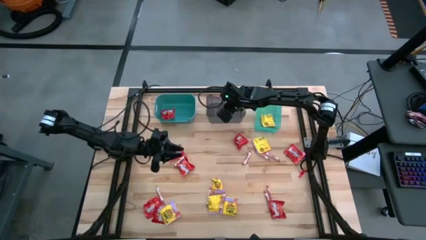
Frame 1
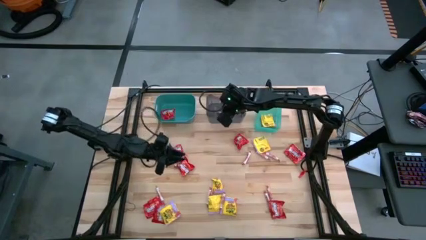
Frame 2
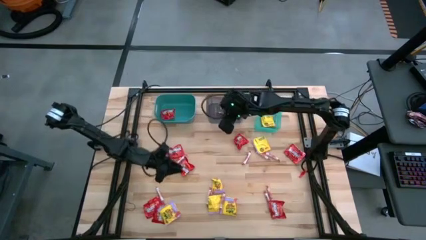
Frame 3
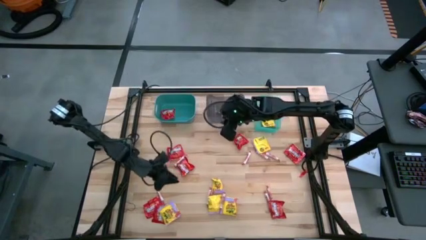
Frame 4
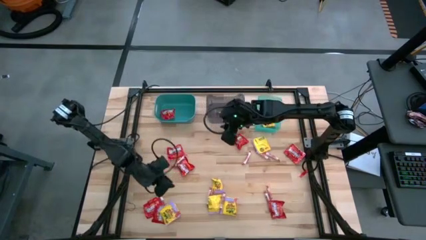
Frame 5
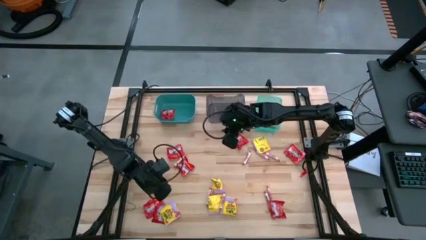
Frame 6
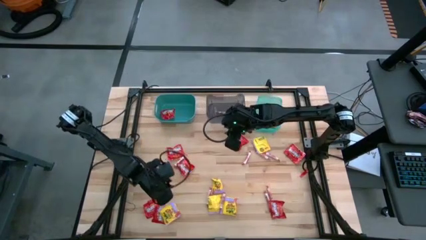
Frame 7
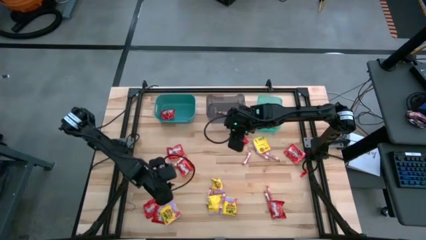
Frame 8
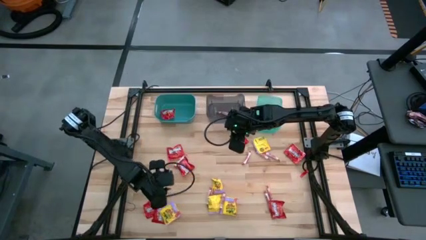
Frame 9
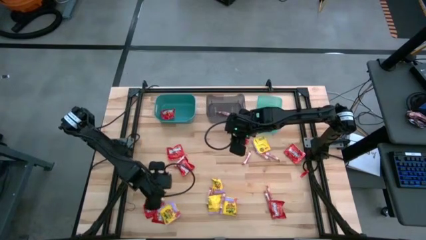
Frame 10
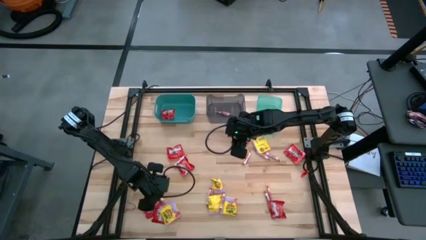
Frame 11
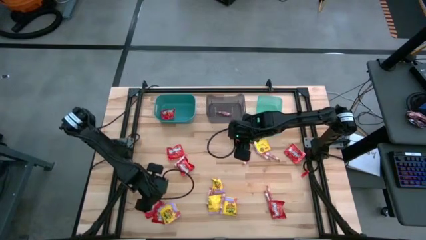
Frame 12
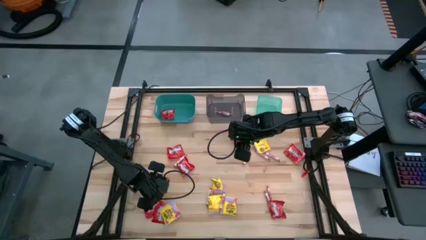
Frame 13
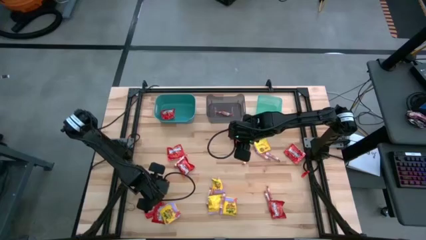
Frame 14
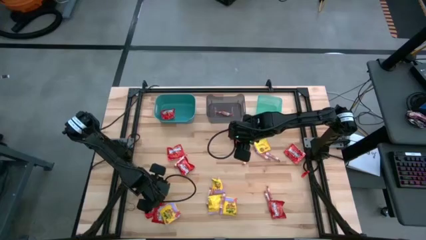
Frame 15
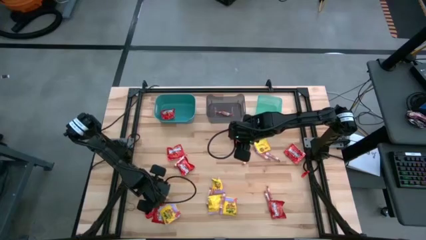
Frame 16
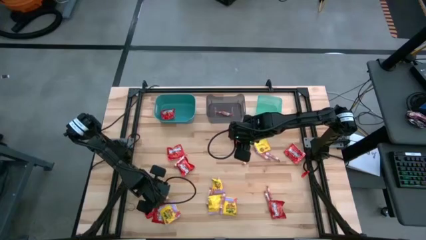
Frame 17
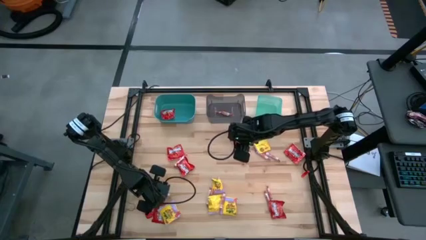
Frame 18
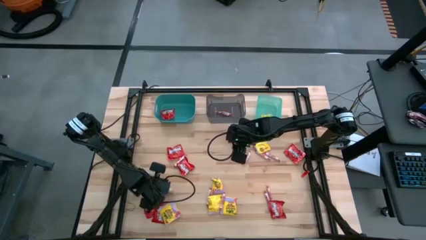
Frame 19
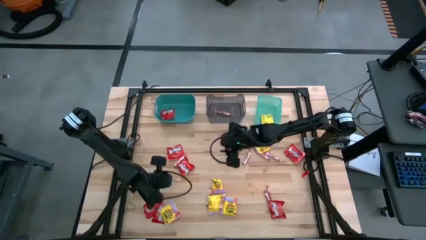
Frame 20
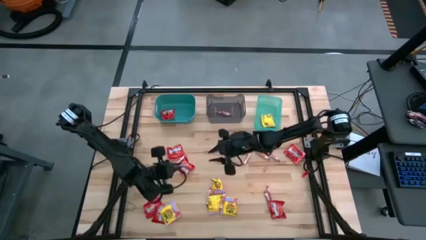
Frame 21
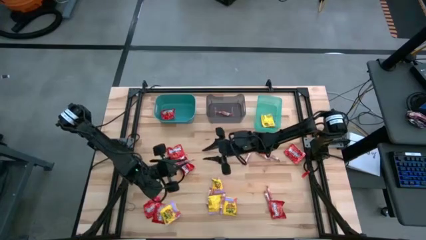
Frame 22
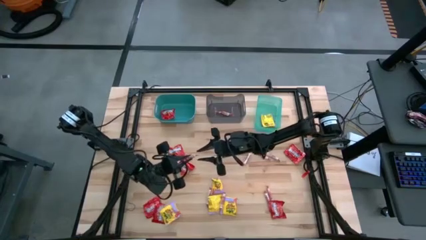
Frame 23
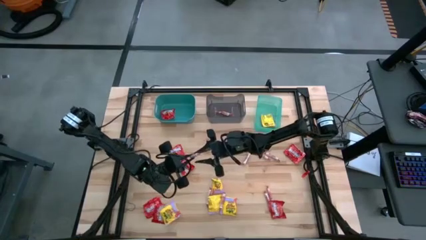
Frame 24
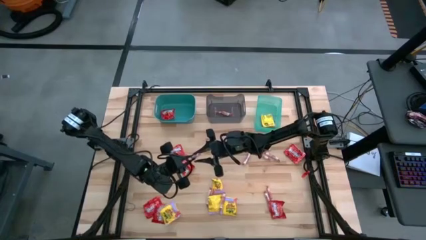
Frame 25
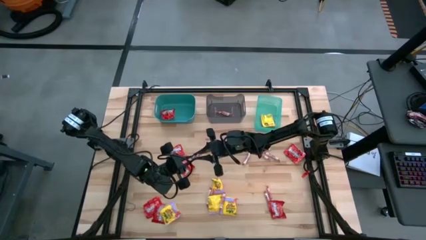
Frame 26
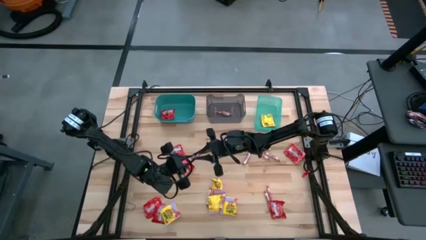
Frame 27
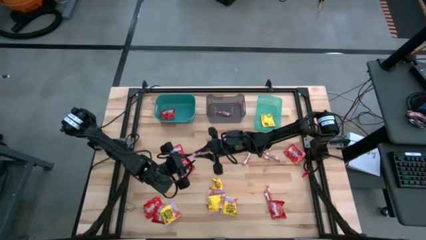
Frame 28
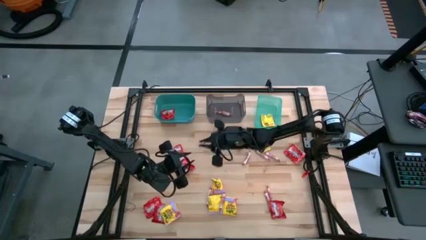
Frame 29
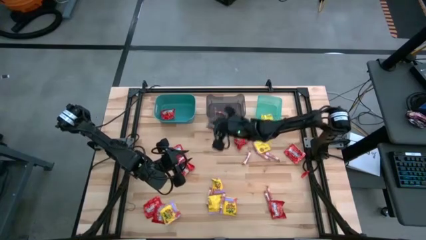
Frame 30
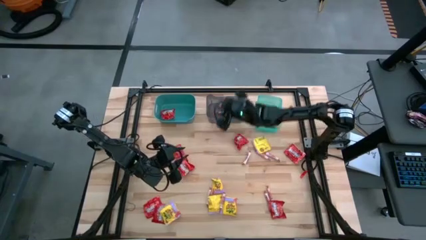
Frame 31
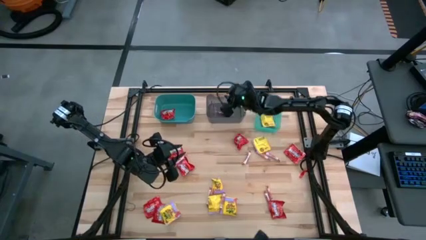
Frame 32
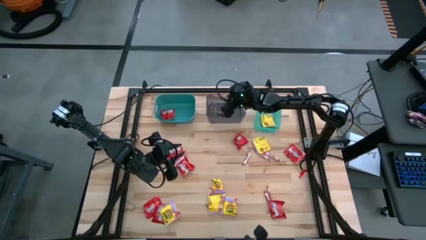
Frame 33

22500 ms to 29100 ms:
Task: Sort candy
Put the white candy into the black bin

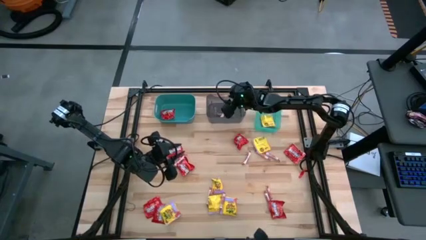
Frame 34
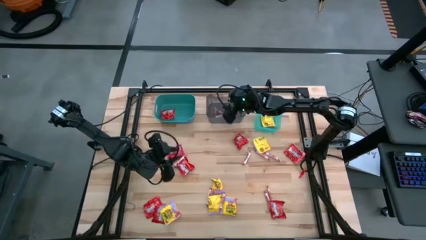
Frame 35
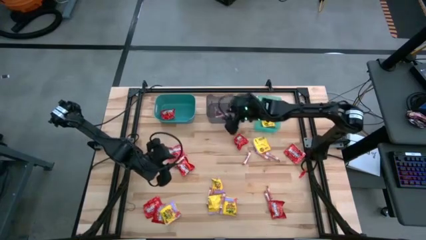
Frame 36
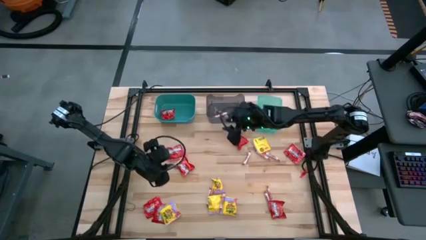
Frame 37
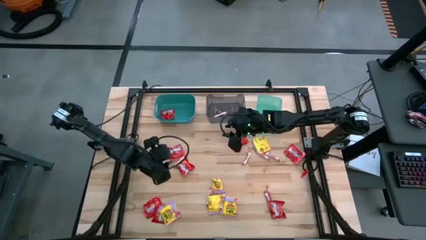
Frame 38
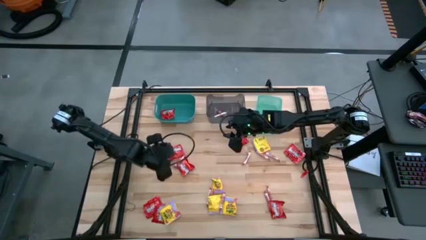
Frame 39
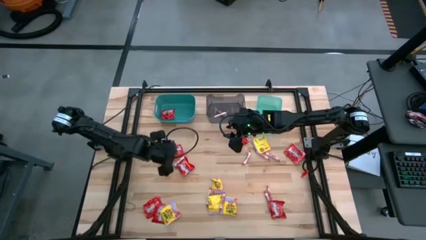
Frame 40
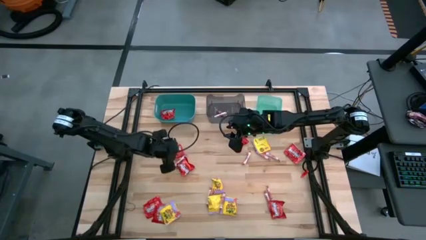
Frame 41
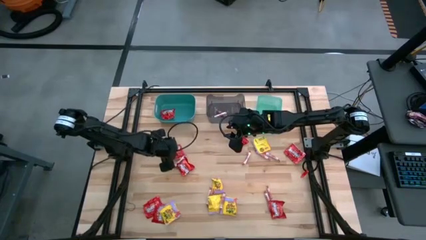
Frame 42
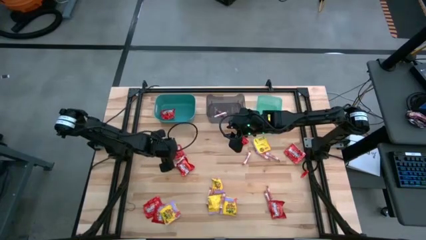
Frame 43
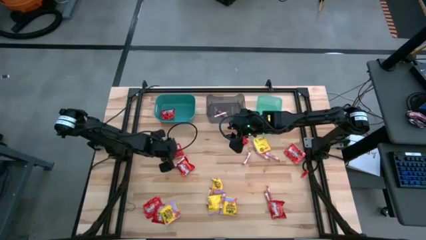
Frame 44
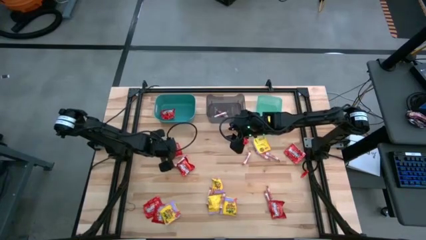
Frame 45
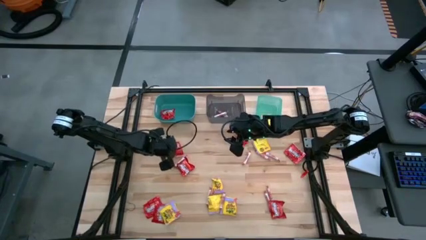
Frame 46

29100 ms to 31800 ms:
Put the red candy into the green bin

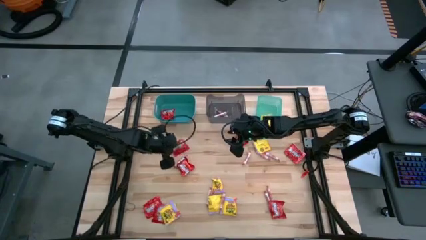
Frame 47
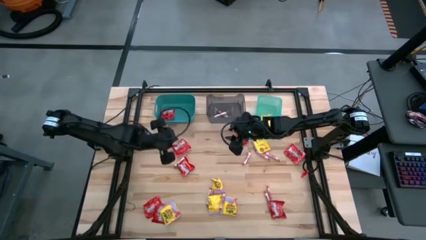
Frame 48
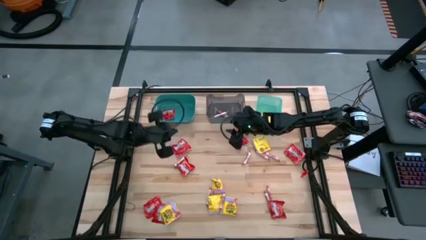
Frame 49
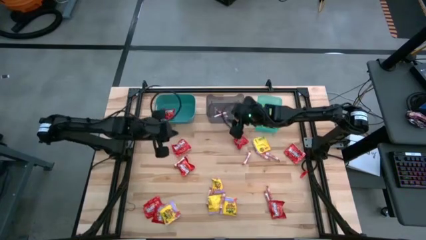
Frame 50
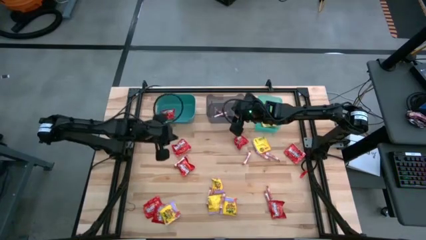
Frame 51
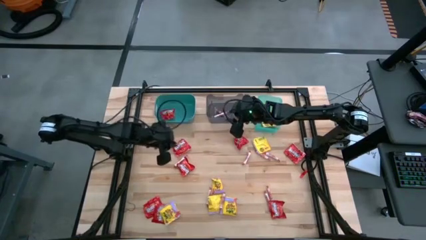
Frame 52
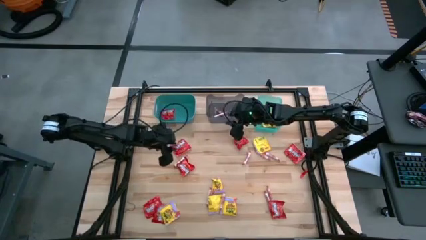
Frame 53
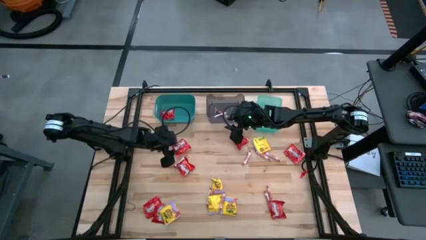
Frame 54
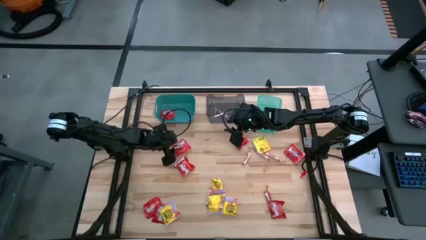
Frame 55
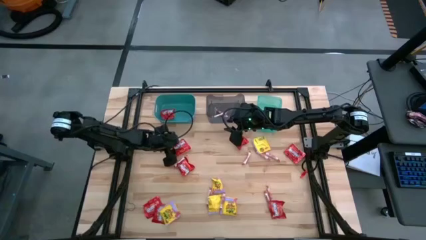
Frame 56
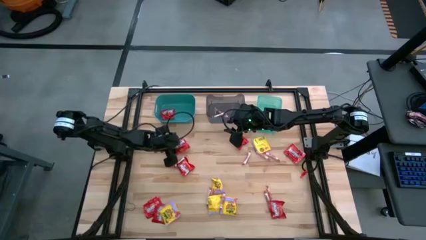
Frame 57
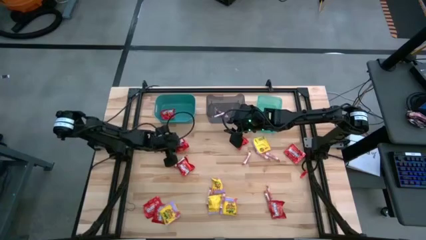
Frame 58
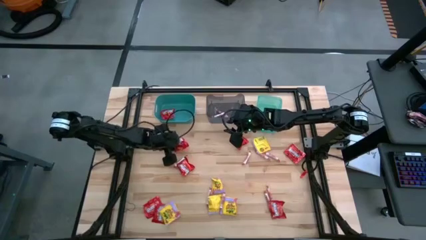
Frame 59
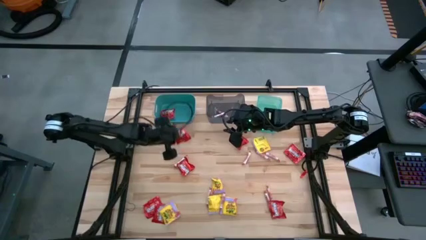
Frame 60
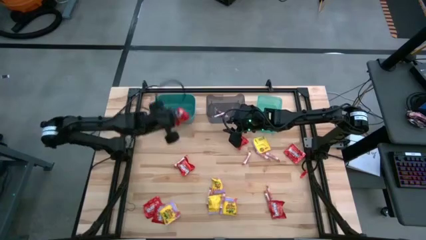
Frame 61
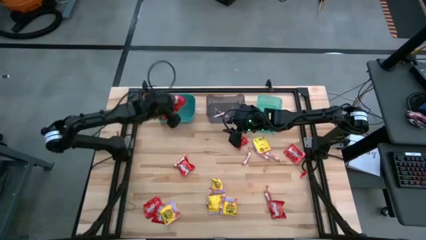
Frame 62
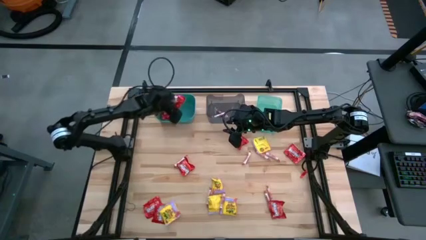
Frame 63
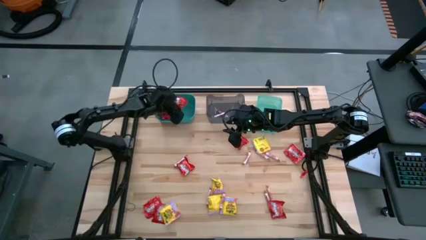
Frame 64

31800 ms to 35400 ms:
Put the red candy into the green bin

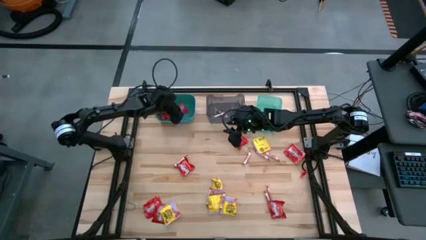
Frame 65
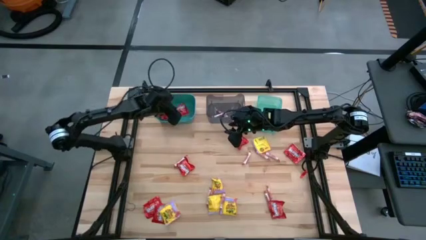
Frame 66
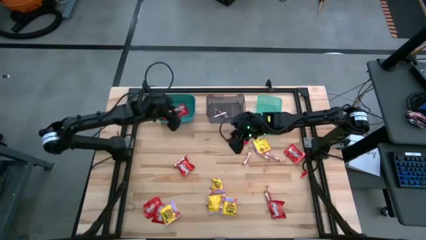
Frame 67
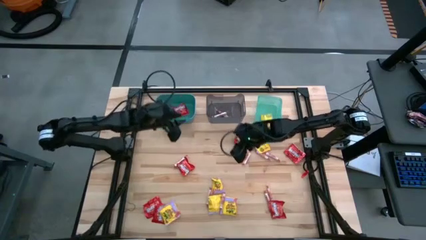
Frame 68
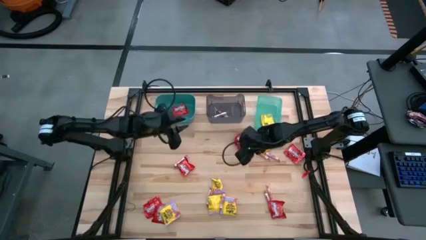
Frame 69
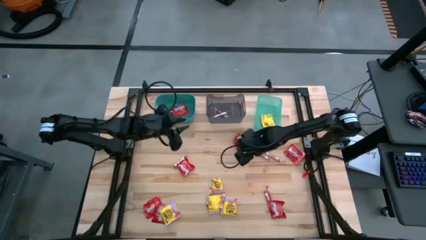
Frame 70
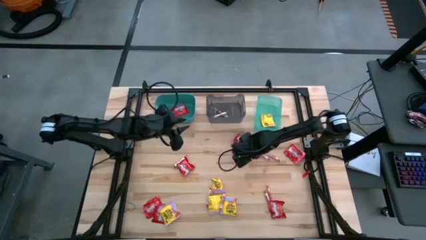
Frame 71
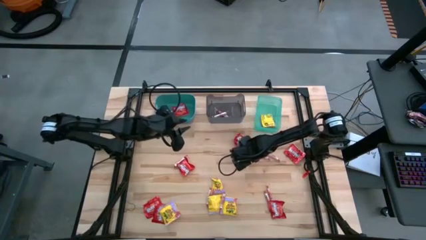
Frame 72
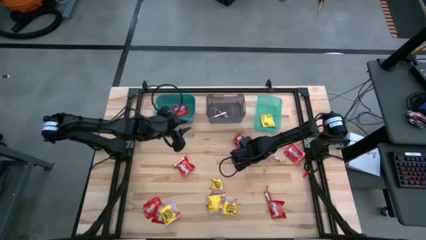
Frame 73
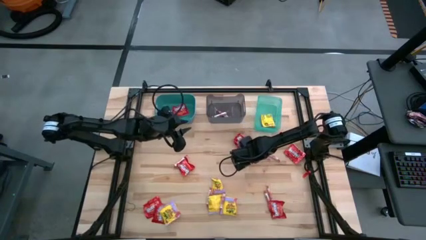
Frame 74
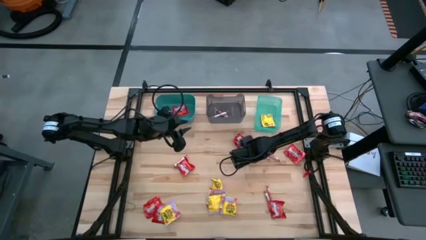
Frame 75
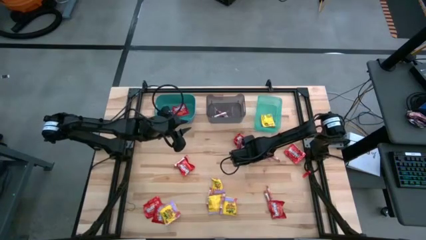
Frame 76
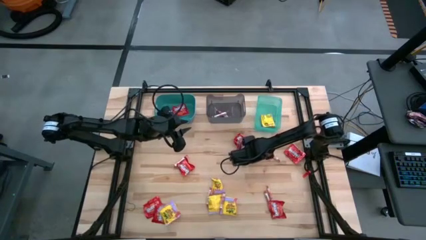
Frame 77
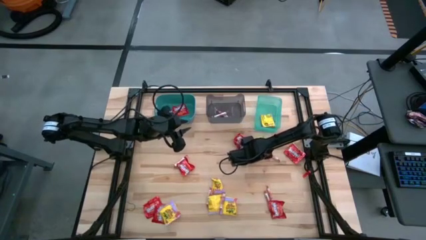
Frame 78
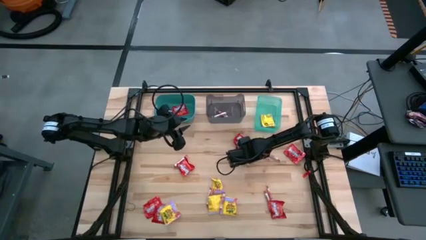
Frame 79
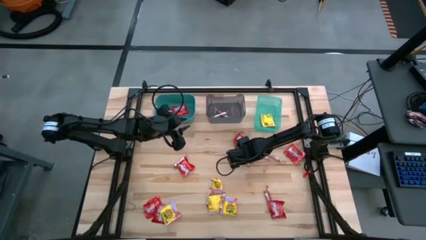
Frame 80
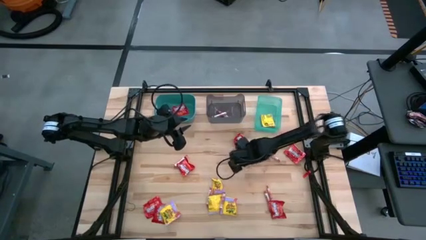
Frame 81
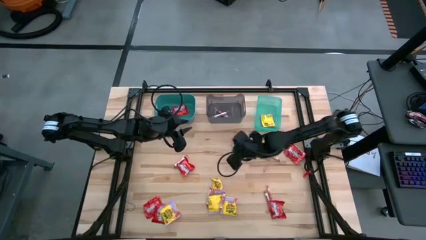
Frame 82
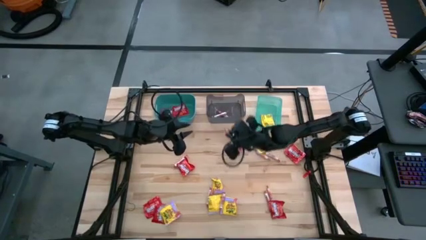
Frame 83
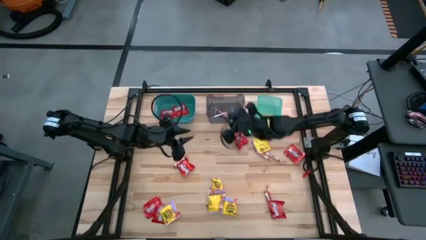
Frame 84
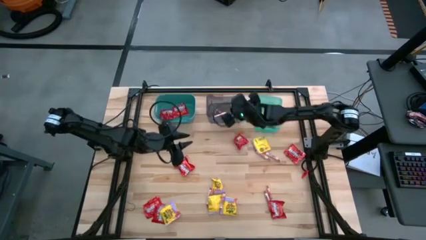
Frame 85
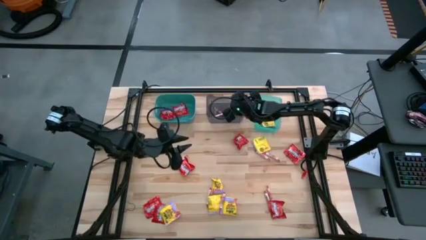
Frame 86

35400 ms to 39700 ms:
Put the white candy into the black bin
